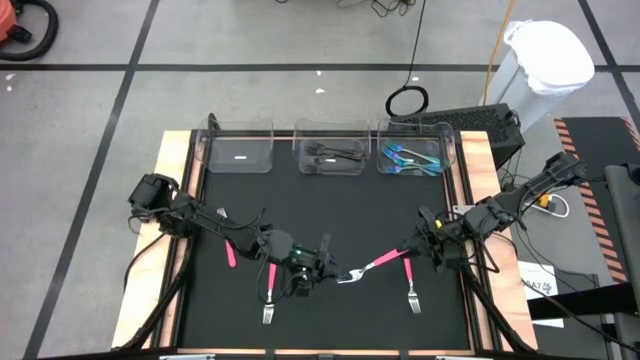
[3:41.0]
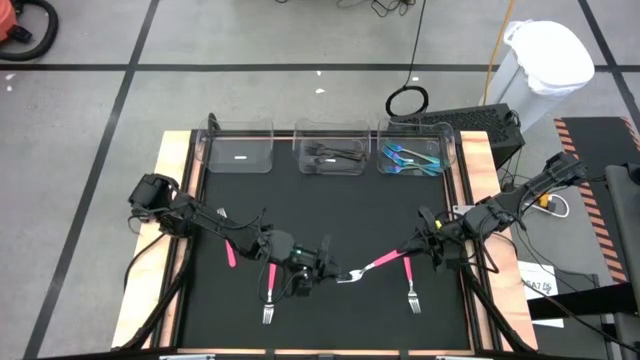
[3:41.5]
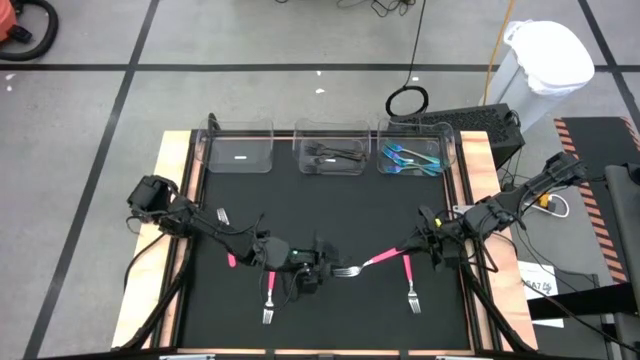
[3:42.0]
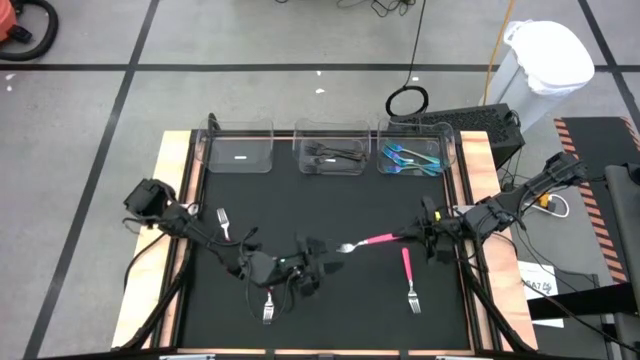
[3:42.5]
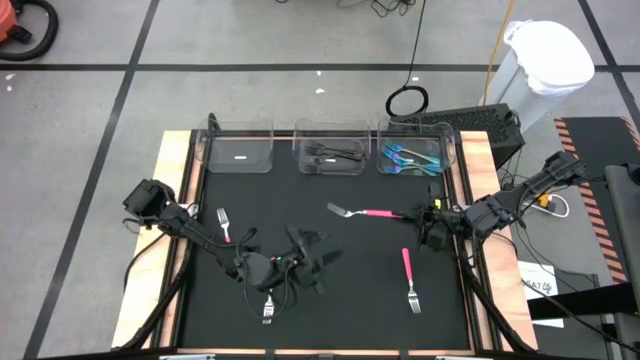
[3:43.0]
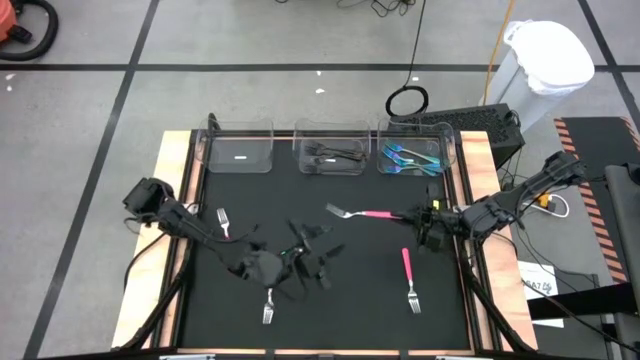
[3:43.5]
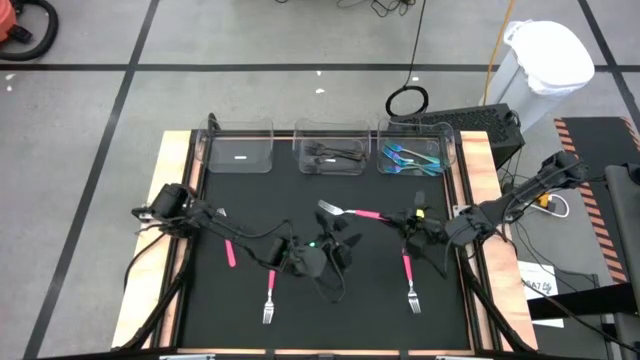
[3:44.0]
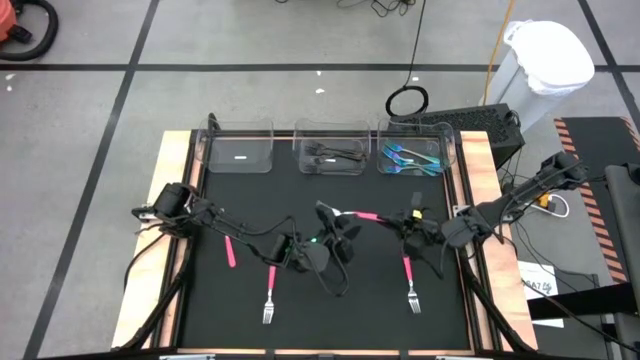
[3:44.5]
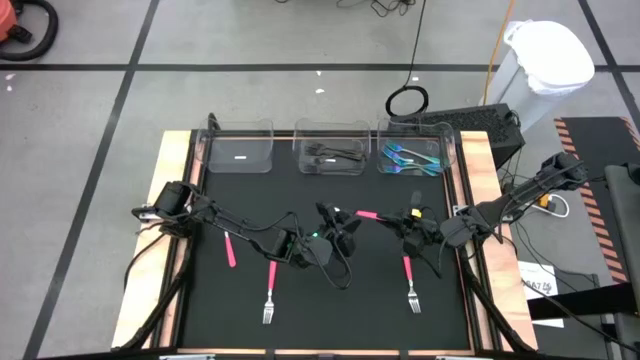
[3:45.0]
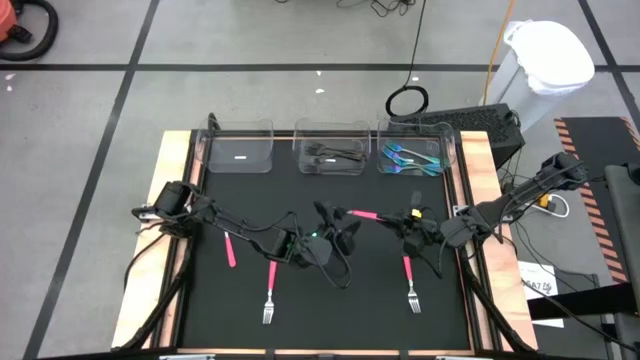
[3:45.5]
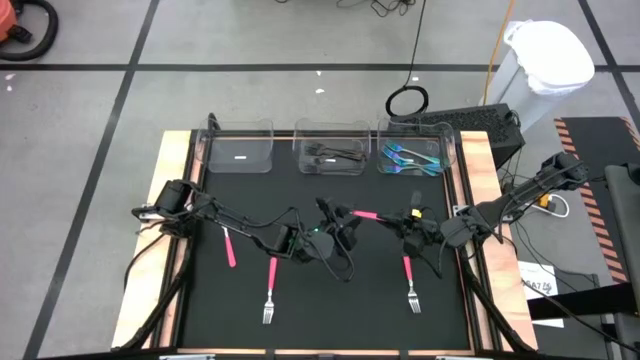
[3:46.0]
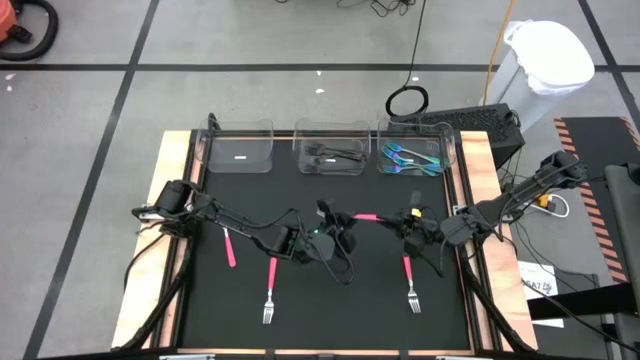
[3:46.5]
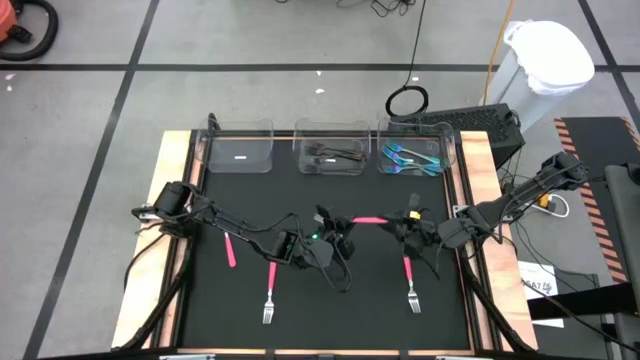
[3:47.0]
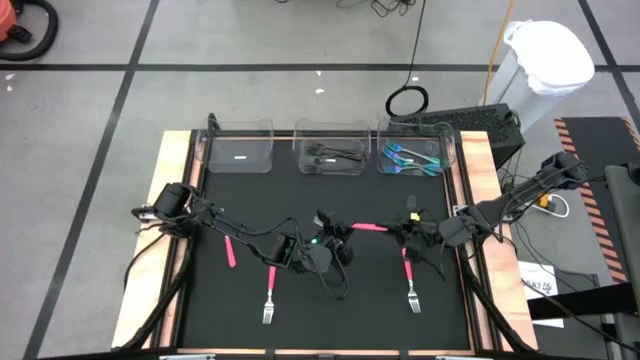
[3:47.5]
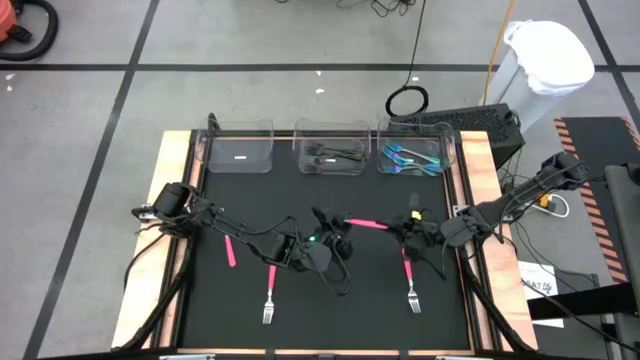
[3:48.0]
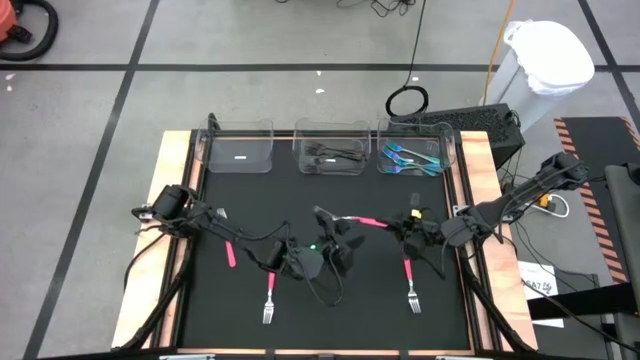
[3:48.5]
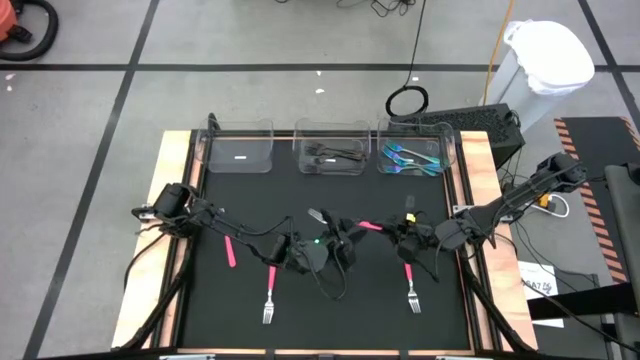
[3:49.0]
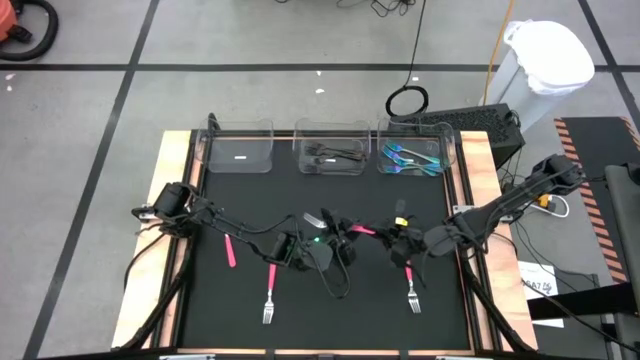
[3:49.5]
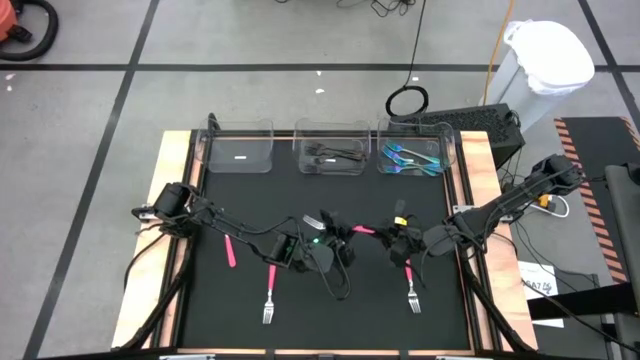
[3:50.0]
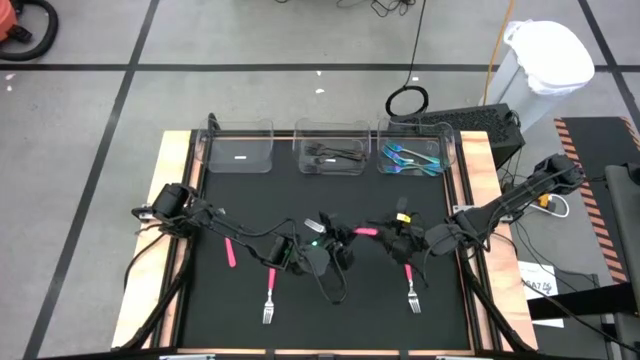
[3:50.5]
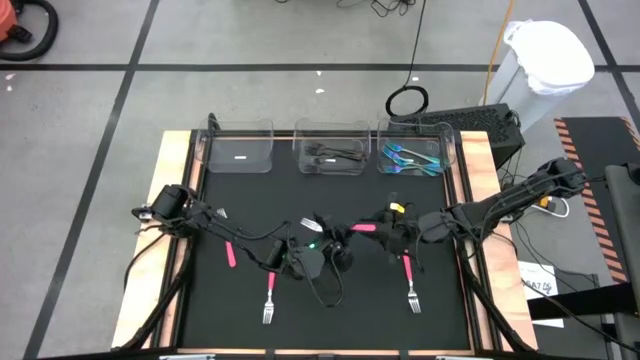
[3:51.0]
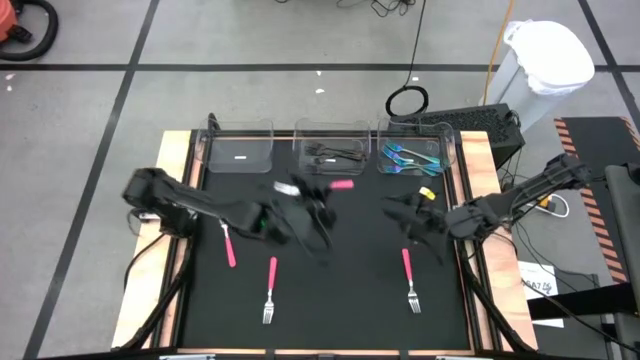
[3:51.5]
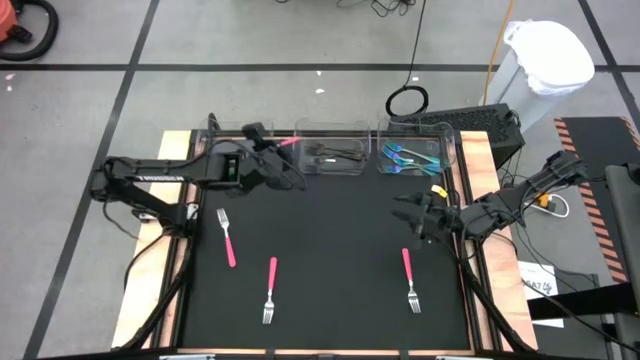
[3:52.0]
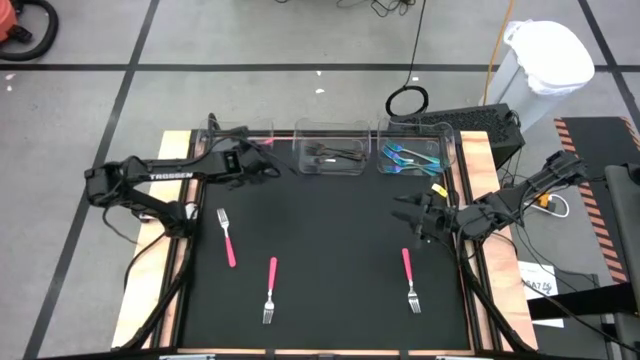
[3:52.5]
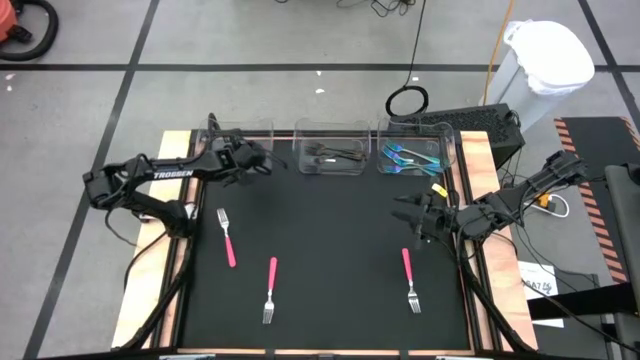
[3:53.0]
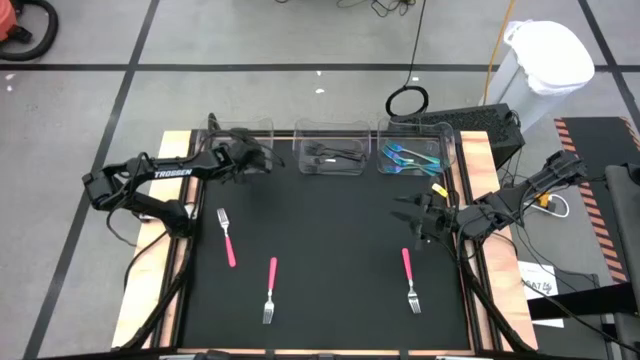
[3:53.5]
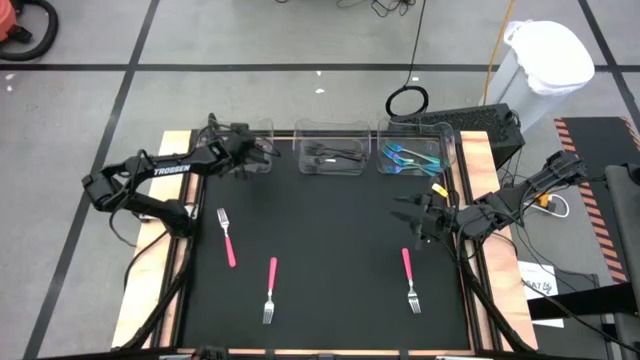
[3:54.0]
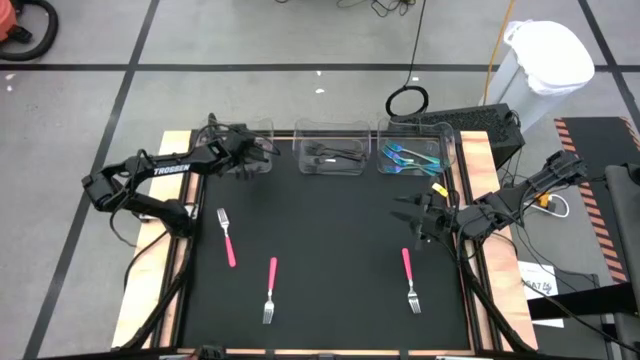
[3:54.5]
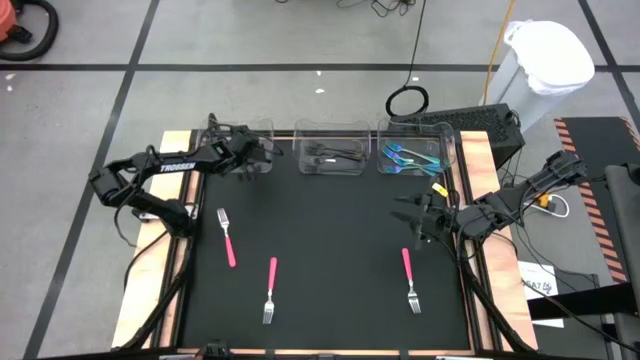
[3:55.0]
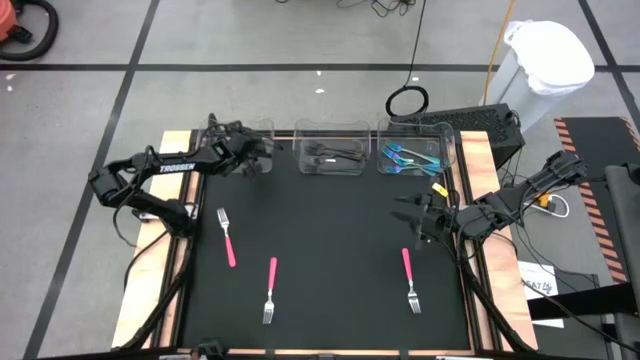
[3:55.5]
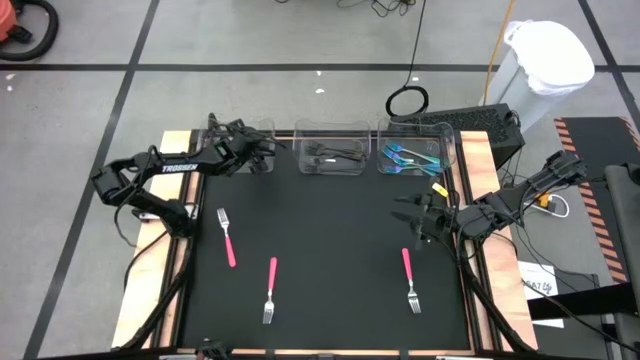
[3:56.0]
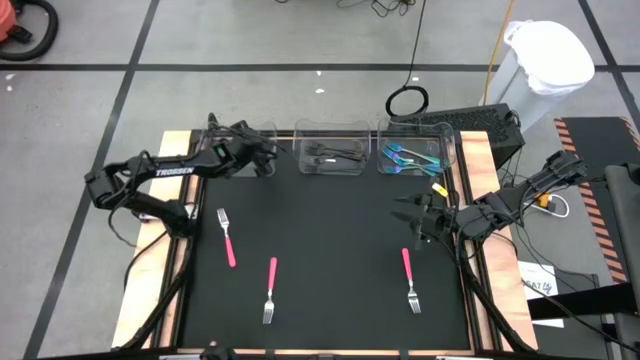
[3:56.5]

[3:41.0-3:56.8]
Task: Sort silverware by color (type)
Put the pink fork into the left transparent bin

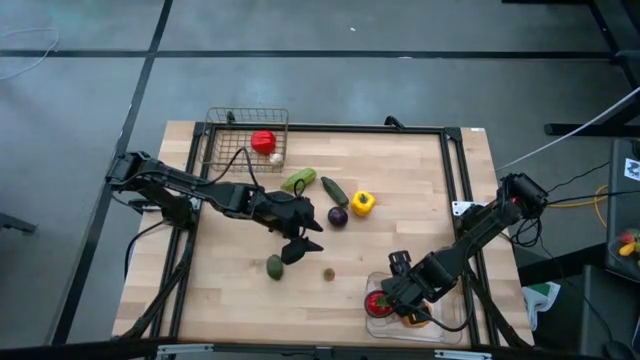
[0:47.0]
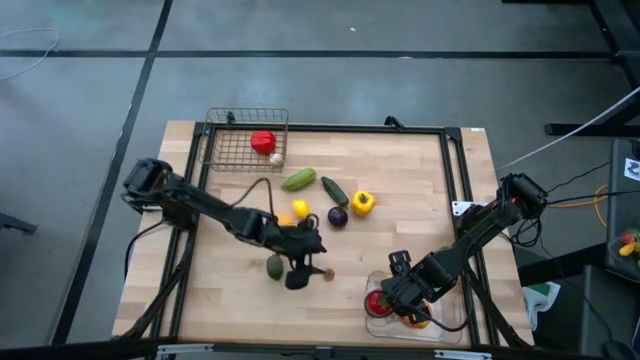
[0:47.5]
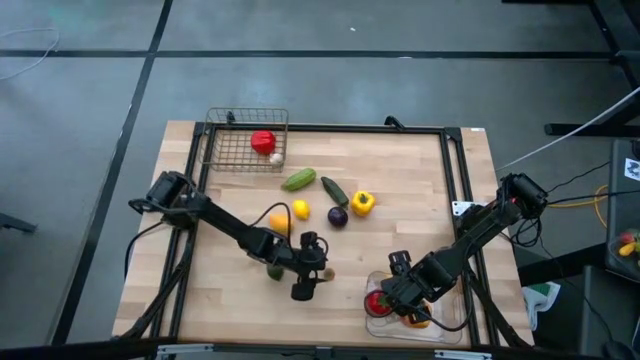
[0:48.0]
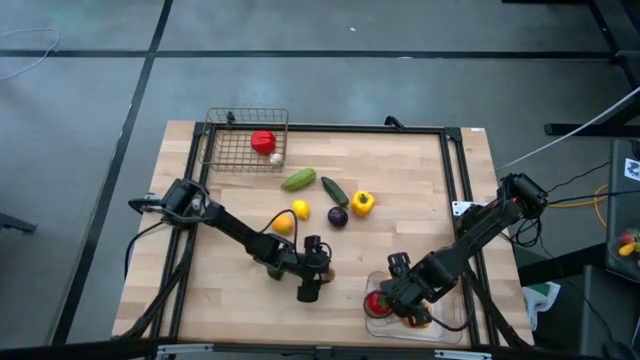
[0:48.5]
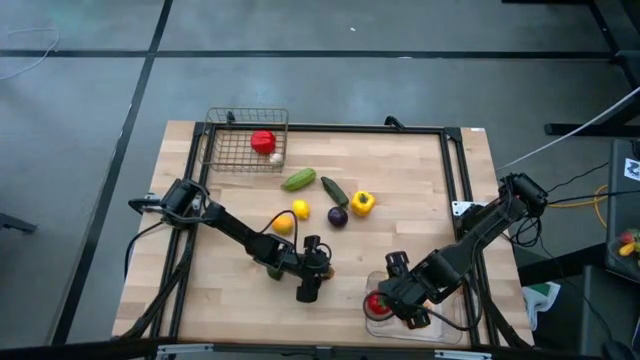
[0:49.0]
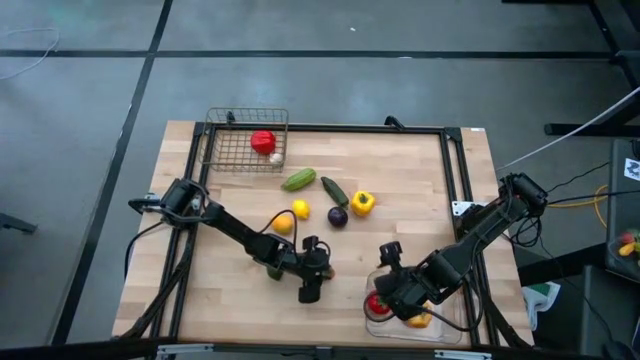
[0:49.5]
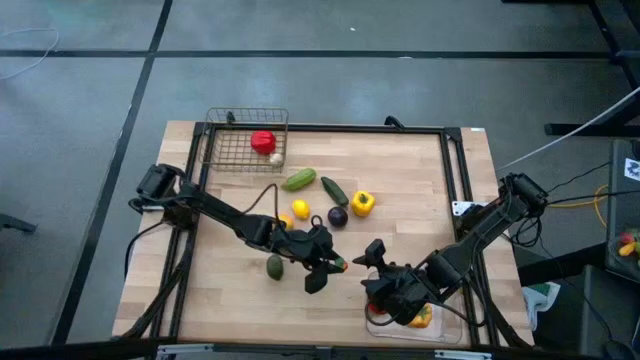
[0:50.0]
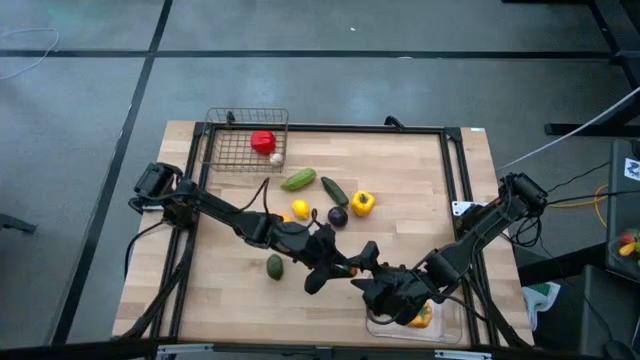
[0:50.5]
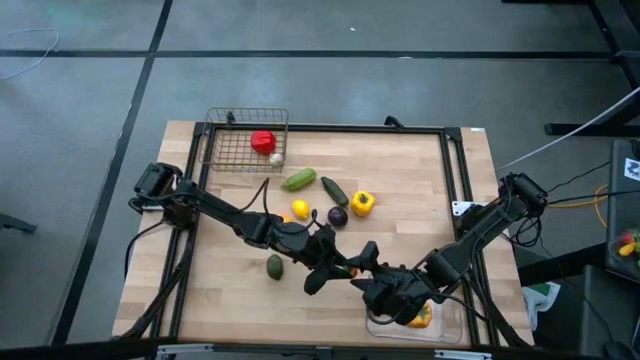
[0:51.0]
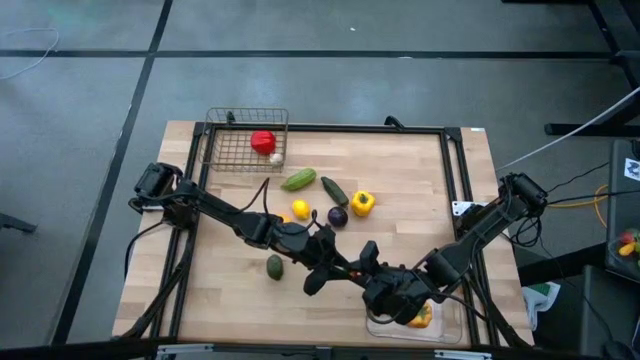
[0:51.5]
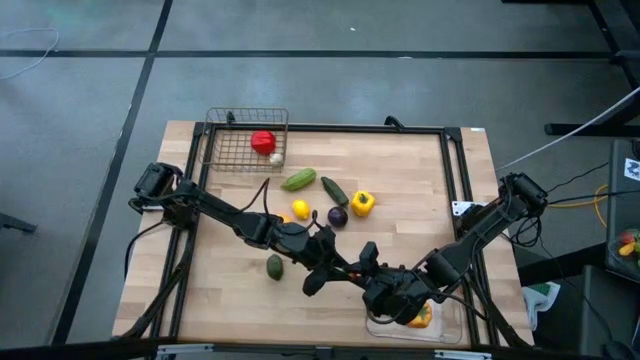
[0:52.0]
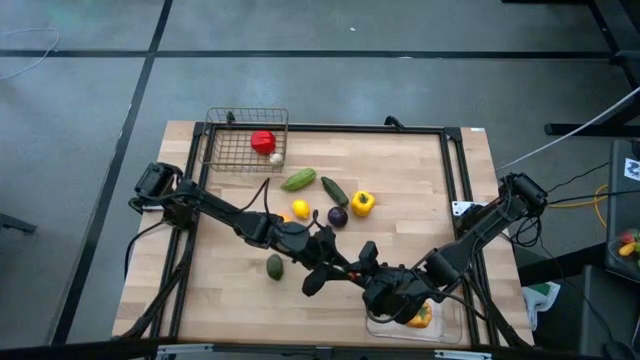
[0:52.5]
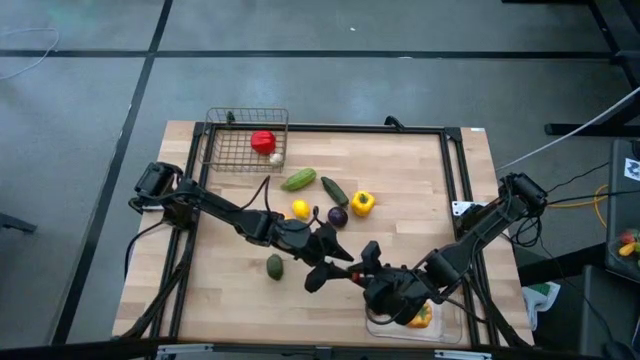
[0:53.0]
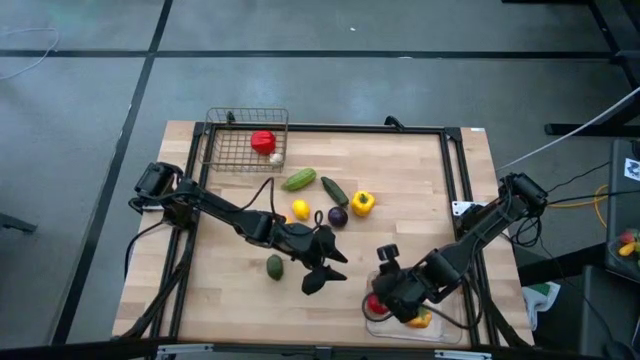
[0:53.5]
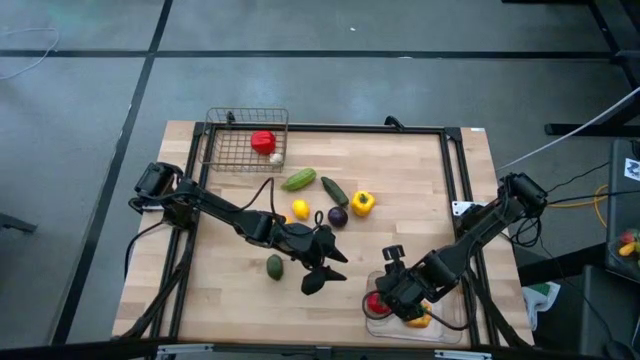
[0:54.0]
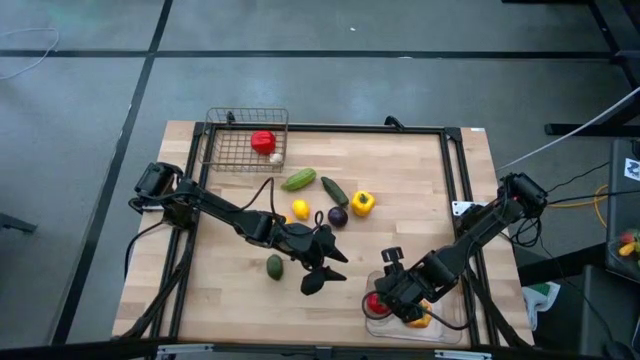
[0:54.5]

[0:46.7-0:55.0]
Task: Sort produce into baskets
Put the small orange tomato into the transparent bin
